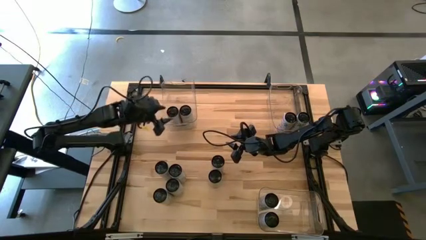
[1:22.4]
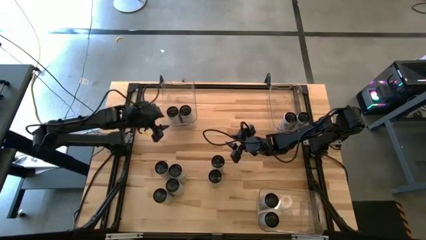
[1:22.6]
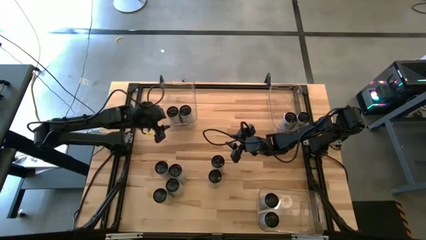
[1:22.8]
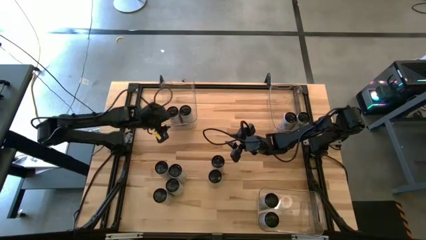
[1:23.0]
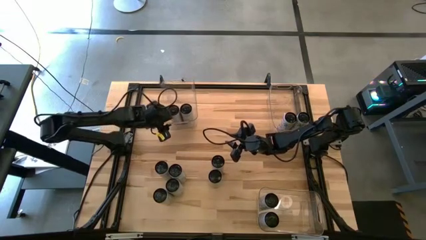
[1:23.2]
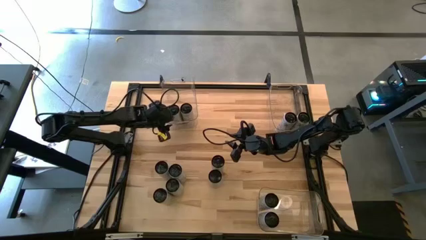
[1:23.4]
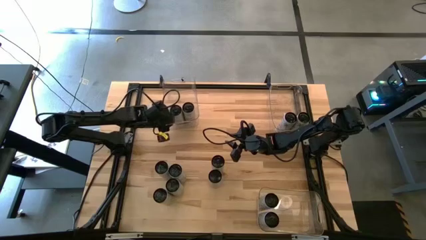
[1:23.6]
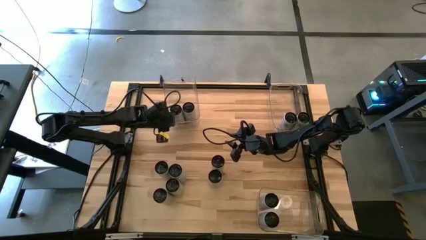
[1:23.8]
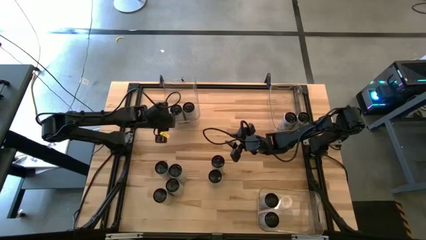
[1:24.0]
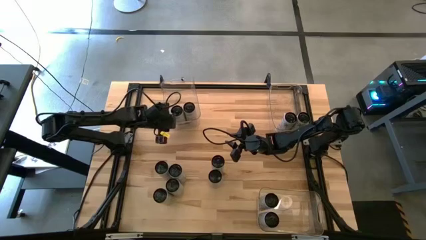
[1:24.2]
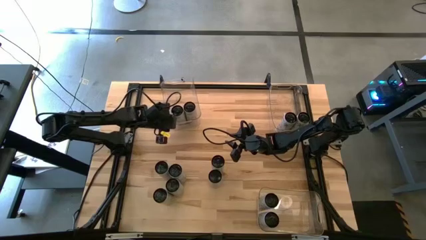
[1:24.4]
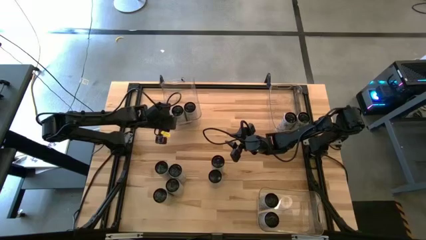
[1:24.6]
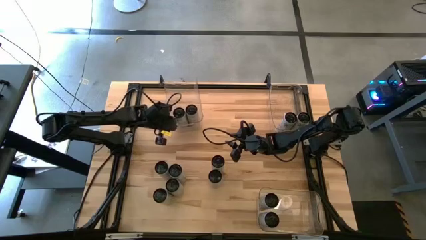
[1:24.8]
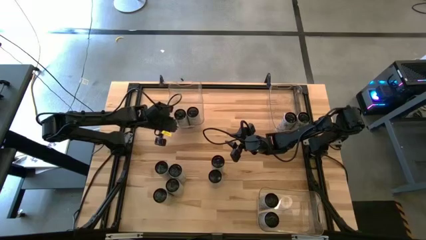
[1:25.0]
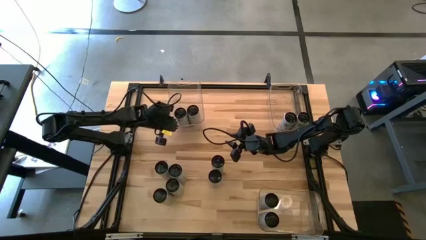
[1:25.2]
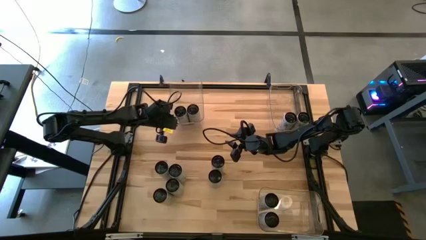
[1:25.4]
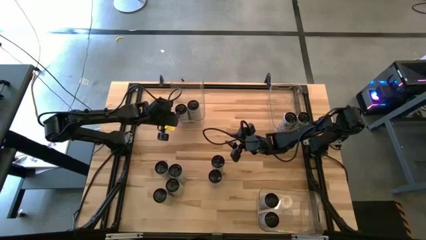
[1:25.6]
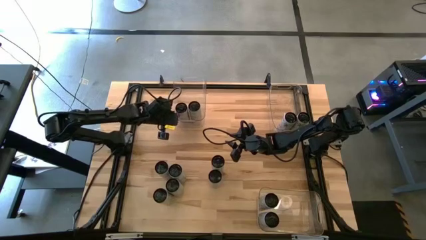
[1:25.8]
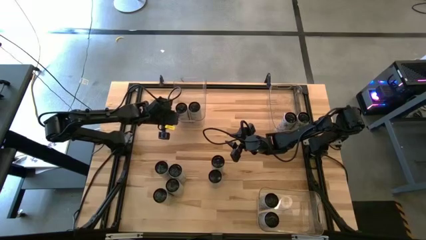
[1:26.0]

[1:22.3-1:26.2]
Task: Sort soda cans
Adjust the top left transparent bin

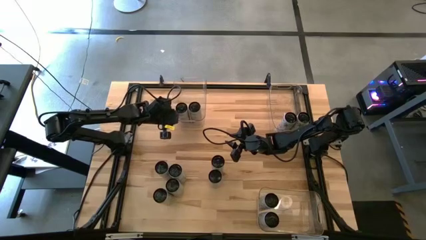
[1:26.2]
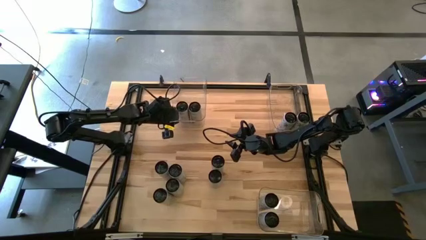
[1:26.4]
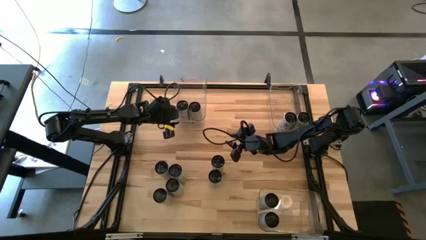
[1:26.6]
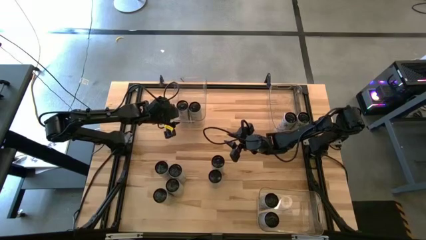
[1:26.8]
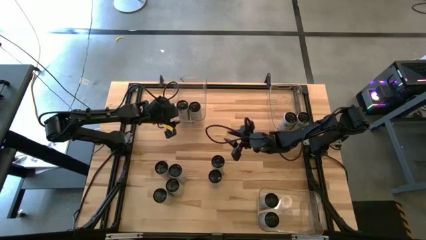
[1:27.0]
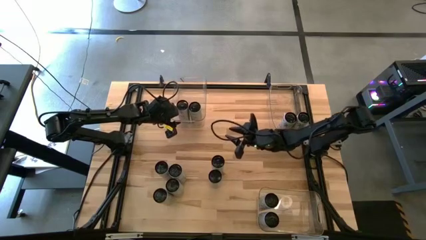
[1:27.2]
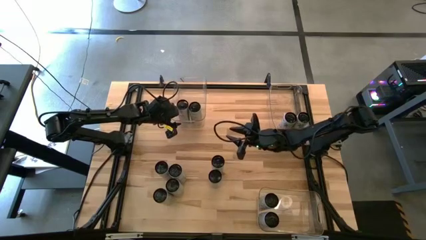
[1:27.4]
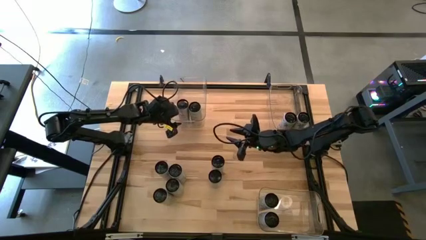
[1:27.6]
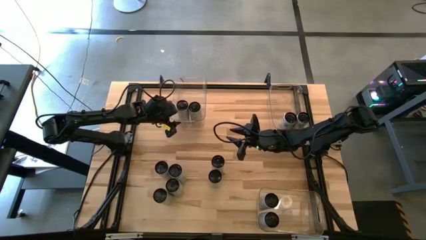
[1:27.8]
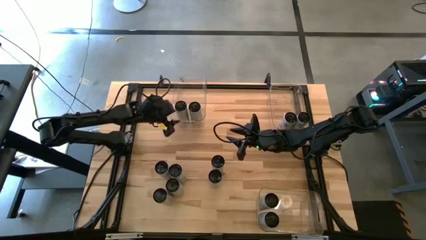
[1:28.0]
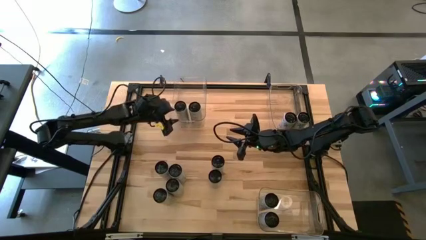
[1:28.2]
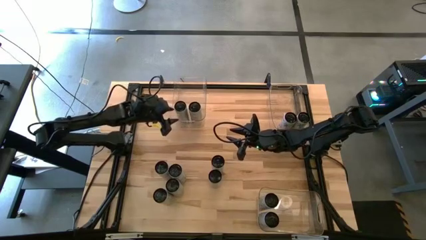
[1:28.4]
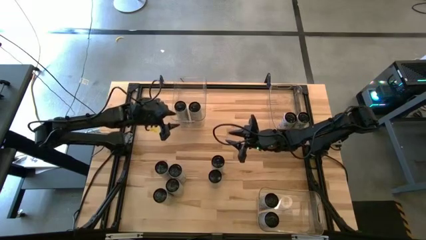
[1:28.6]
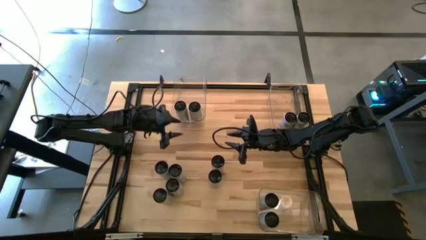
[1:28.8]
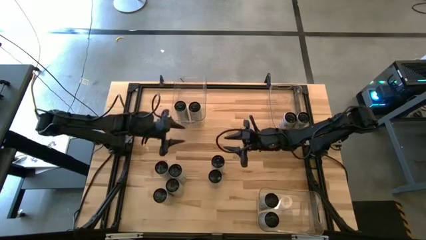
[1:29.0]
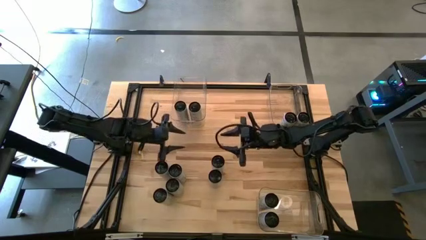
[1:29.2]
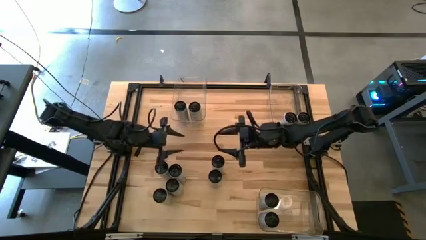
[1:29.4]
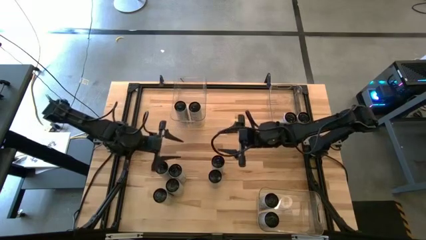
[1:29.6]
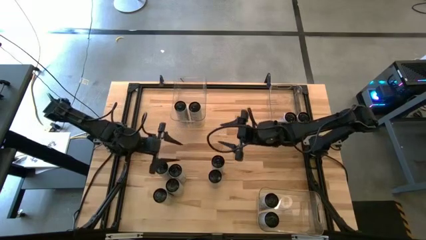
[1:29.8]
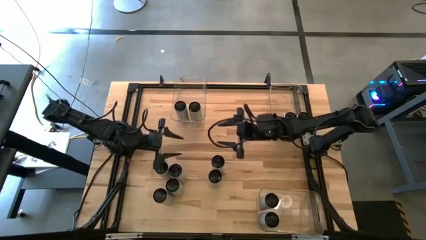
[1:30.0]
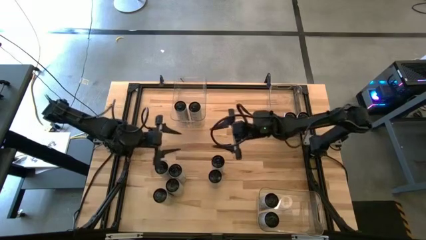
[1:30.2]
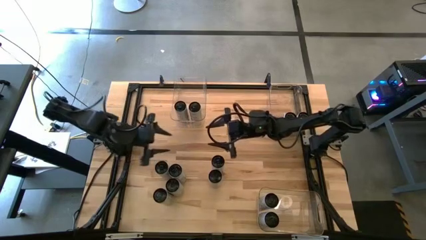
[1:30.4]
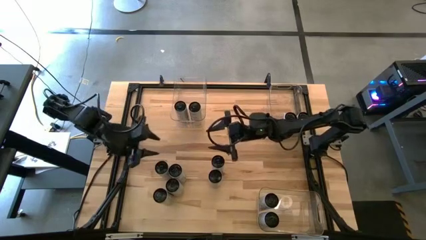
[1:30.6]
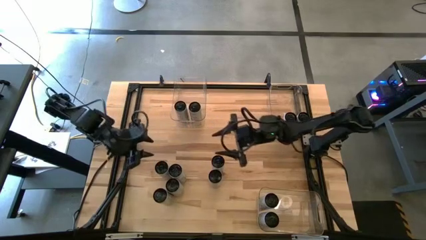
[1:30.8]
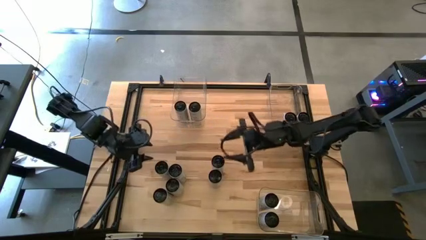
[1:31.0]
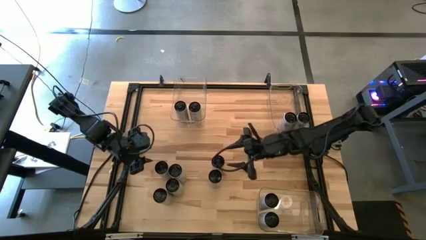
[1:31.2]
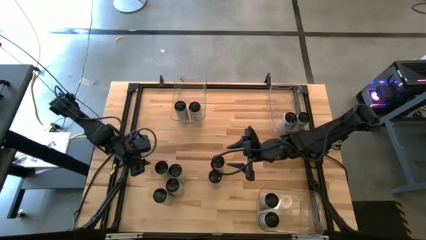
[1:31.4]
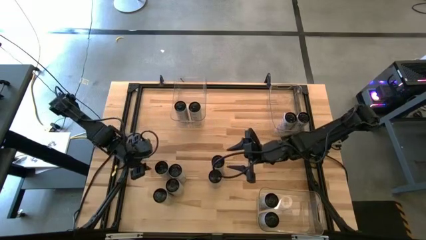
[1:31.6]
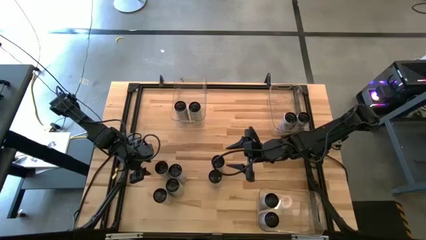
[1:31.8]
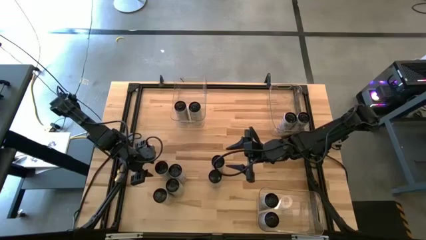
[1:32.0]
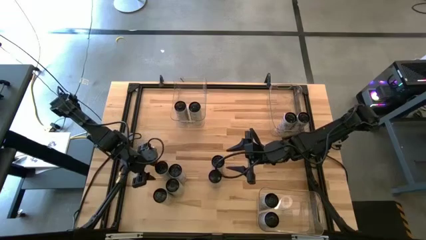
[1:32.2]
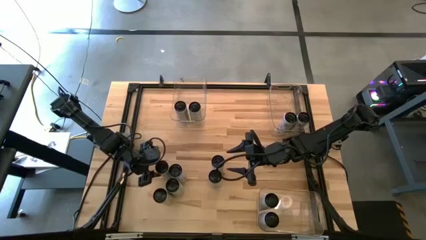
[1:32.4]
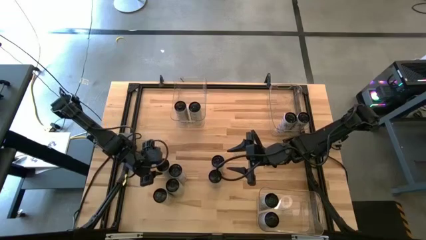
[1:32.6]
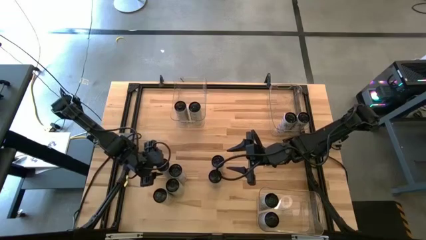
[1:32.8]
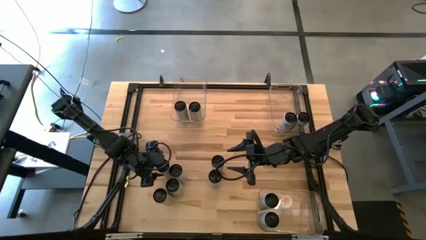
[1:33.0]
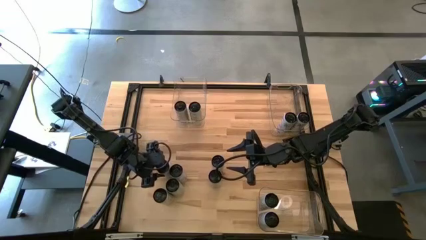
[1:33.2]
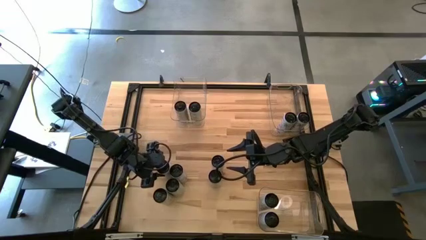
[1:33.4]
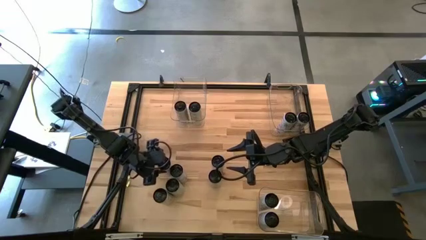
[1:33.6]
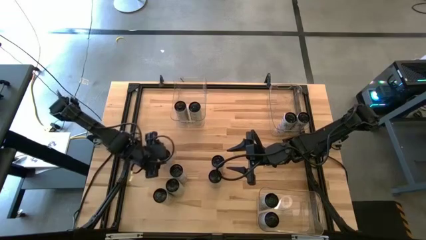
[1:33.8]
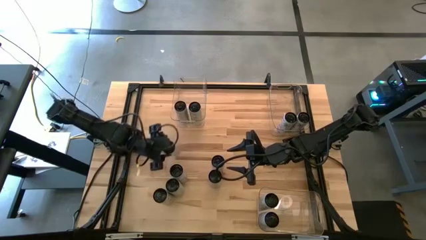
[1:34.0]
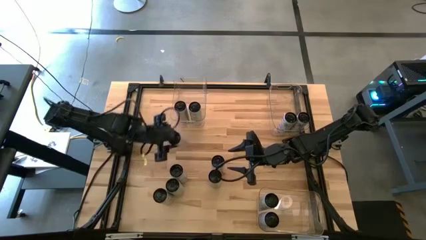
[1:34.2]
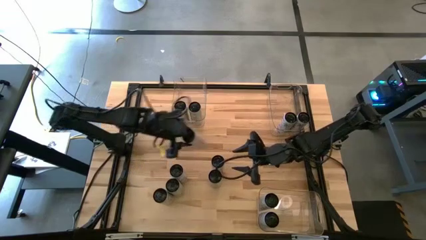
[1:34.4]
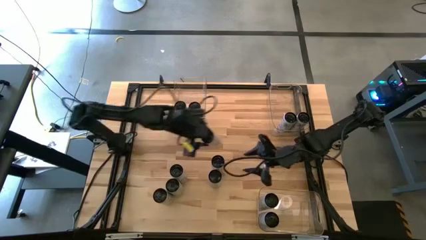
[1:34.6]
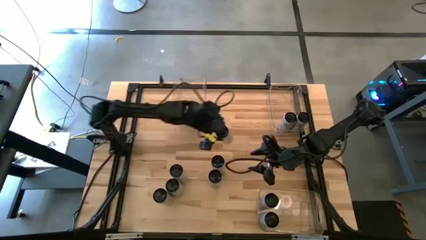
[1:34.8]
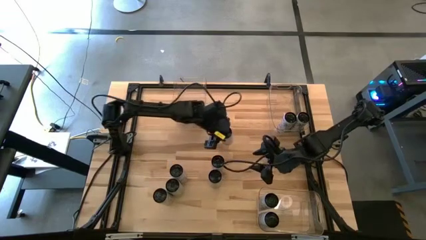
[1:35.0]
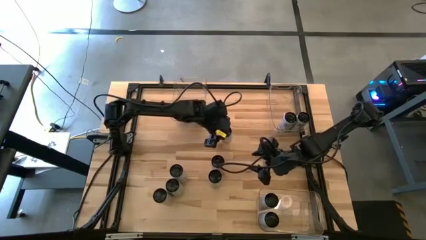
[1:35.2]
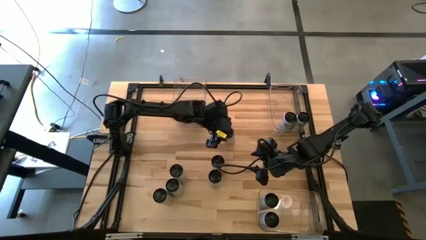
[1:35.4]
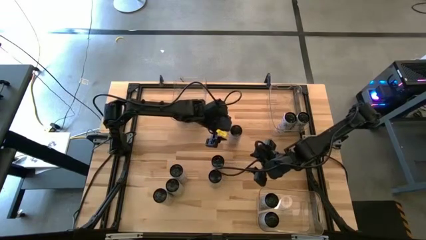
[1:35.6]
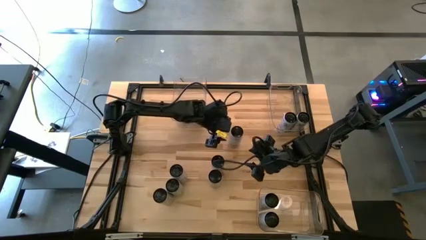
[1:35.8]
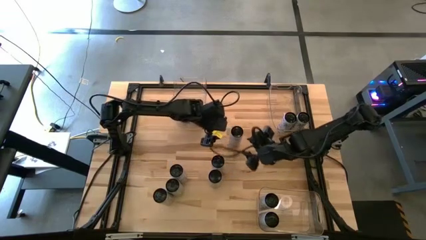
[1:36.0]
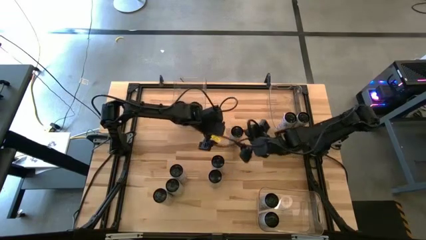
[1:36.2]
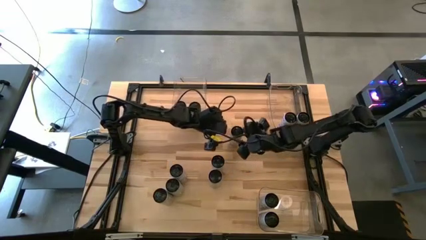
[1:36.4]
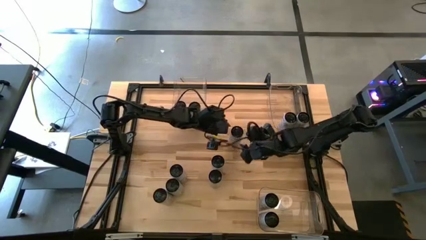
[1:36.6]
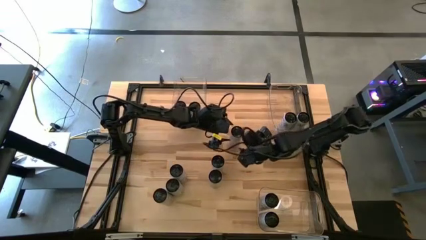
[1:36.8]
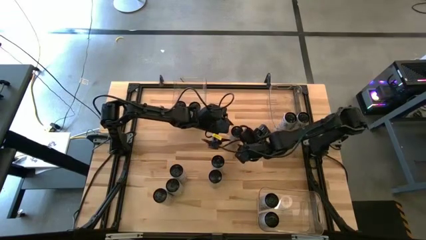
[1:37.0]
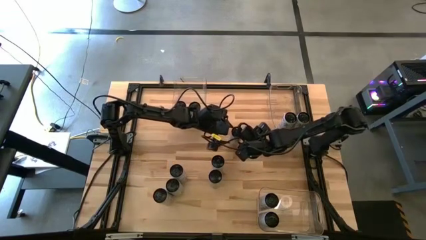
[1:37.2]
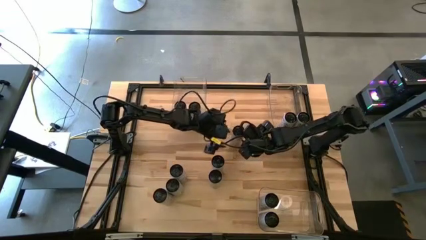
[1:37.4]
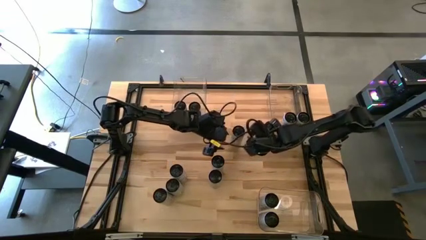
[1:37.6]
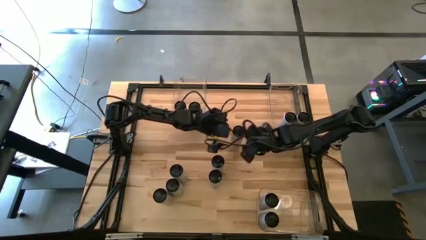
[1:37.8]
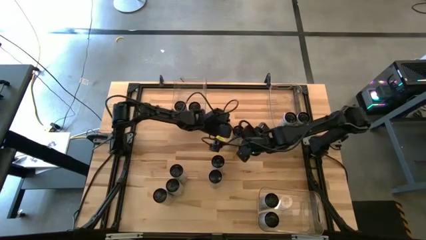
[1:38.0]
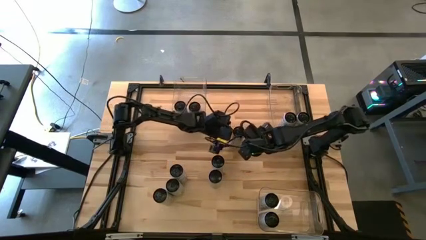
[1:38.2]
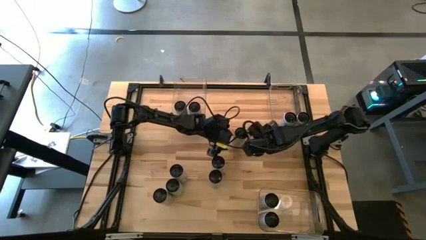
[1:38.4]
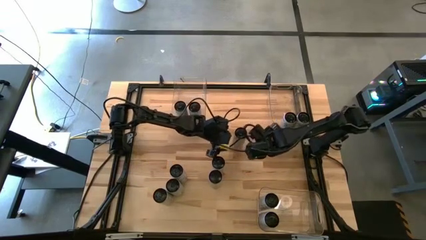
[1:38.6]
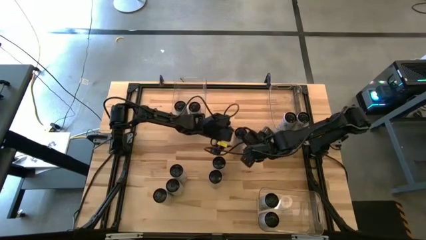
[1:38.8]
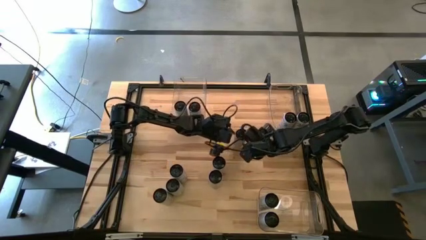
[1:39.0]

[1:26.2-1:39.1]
Put the white/pink soda can into the top right transparent bin
